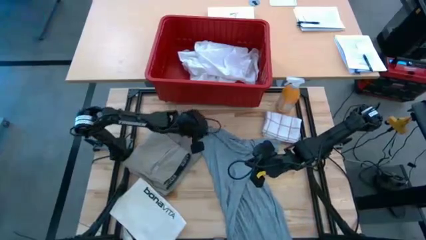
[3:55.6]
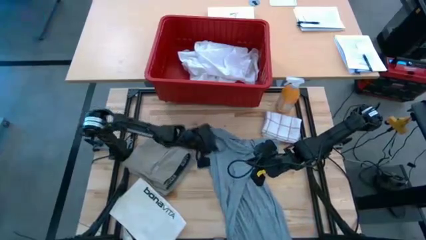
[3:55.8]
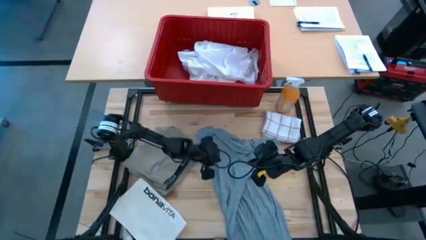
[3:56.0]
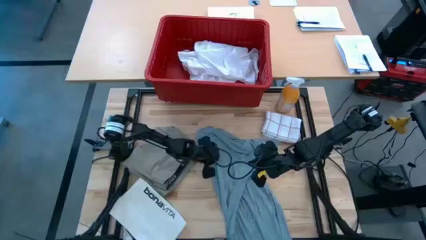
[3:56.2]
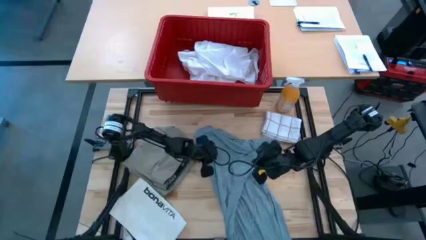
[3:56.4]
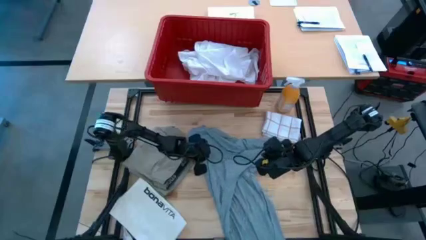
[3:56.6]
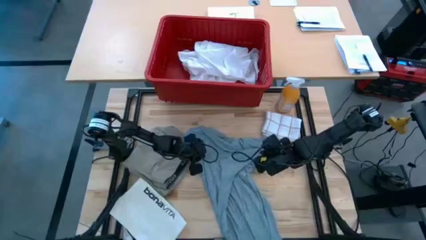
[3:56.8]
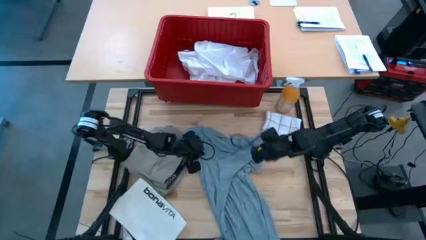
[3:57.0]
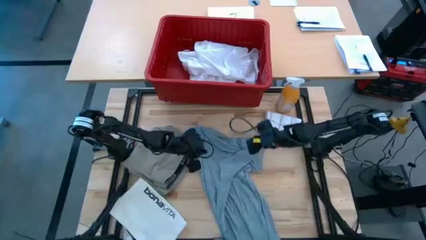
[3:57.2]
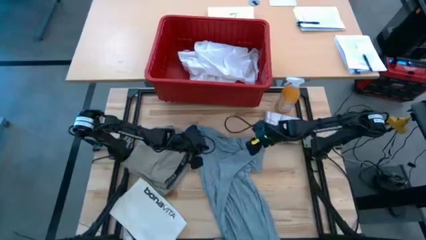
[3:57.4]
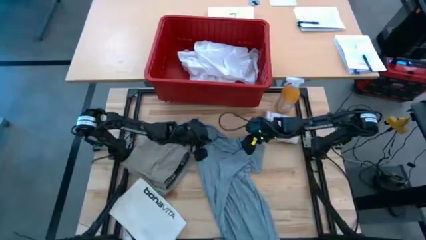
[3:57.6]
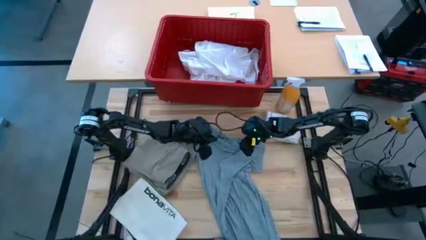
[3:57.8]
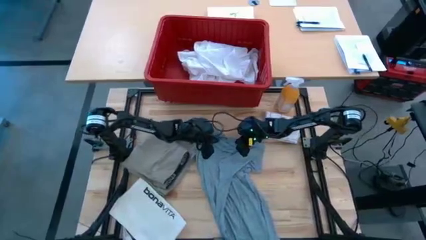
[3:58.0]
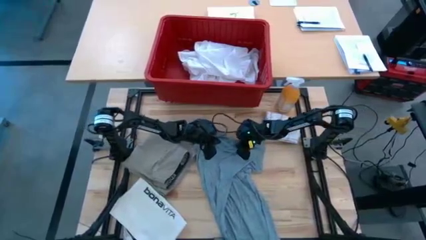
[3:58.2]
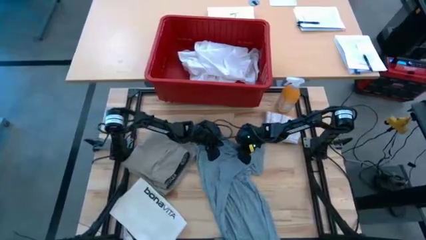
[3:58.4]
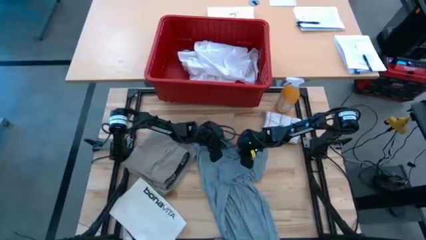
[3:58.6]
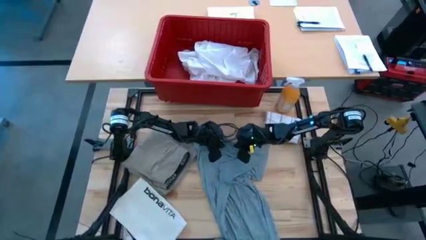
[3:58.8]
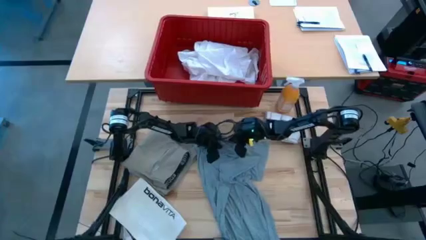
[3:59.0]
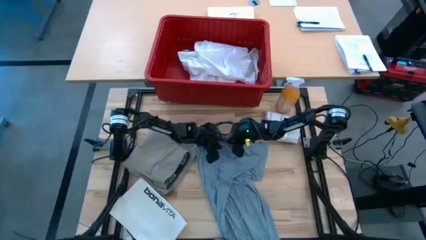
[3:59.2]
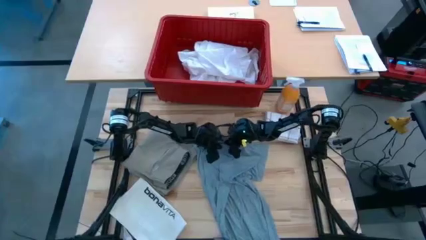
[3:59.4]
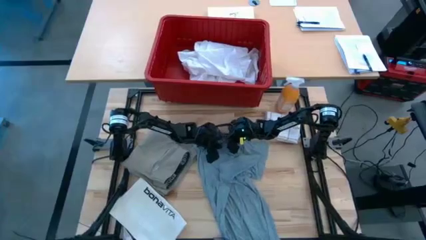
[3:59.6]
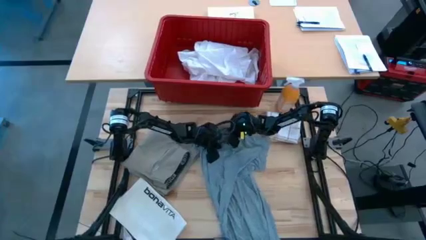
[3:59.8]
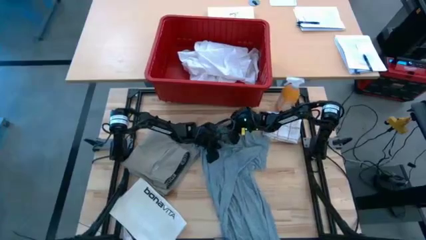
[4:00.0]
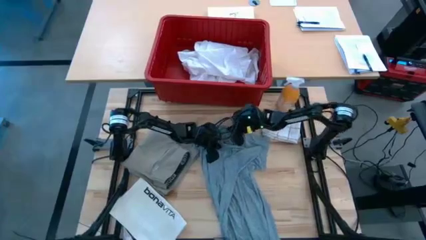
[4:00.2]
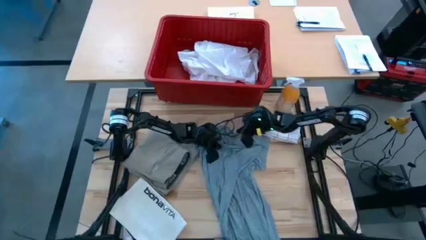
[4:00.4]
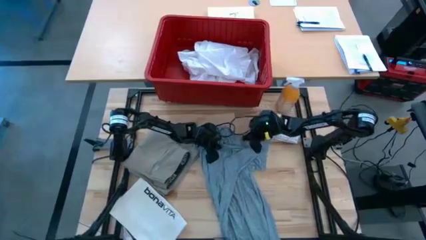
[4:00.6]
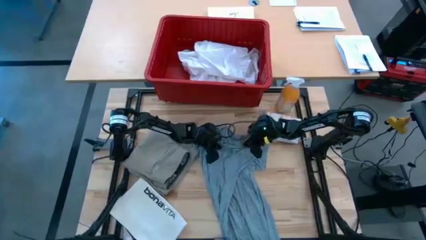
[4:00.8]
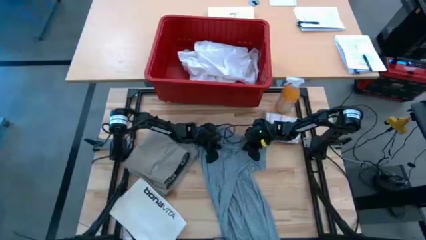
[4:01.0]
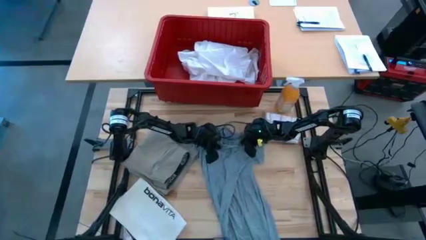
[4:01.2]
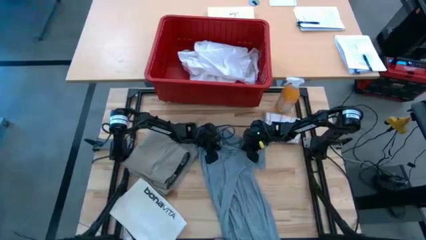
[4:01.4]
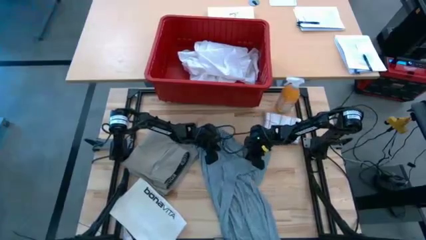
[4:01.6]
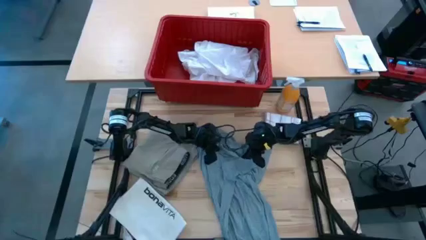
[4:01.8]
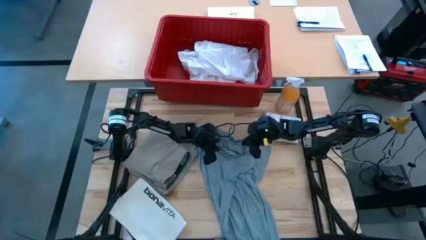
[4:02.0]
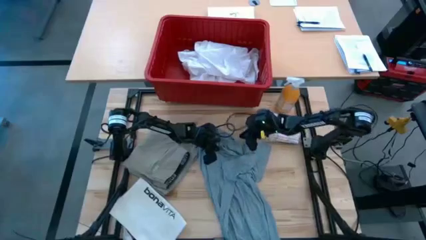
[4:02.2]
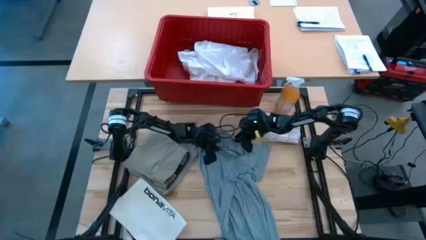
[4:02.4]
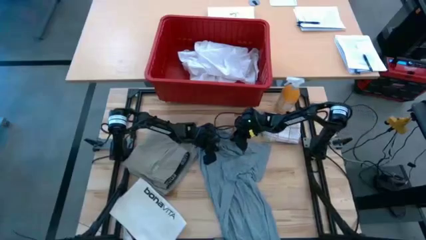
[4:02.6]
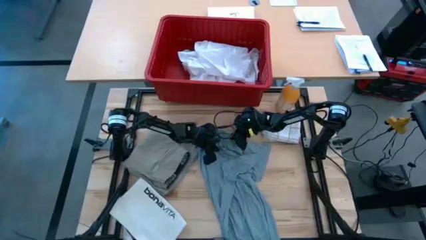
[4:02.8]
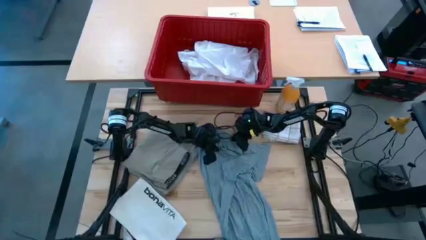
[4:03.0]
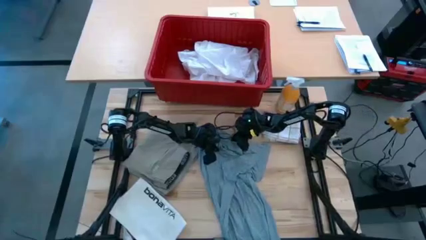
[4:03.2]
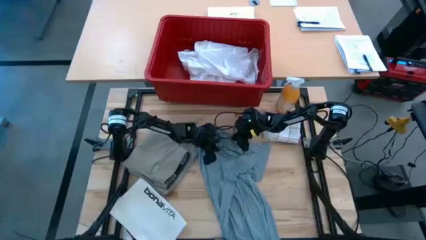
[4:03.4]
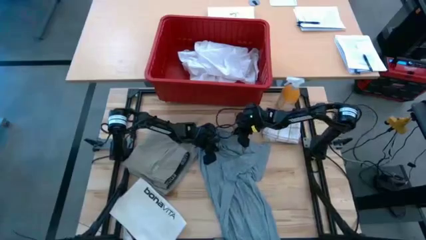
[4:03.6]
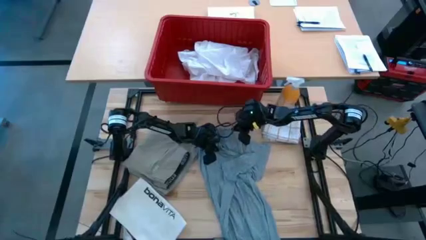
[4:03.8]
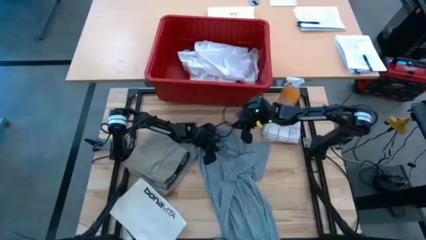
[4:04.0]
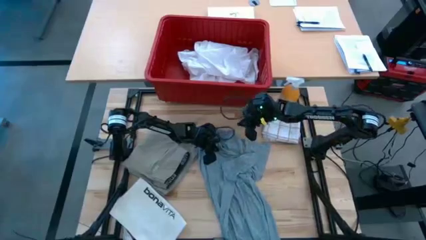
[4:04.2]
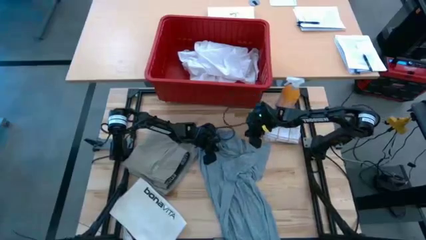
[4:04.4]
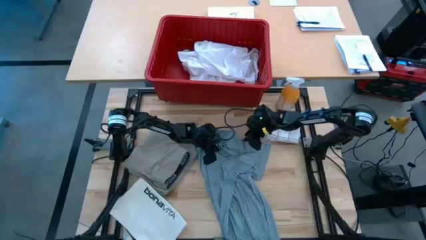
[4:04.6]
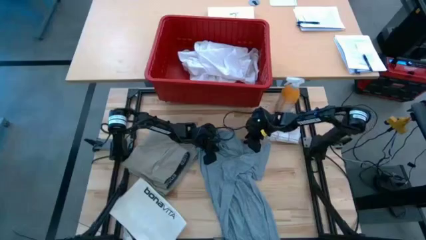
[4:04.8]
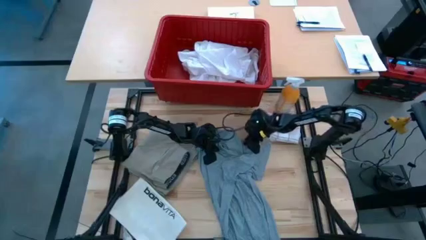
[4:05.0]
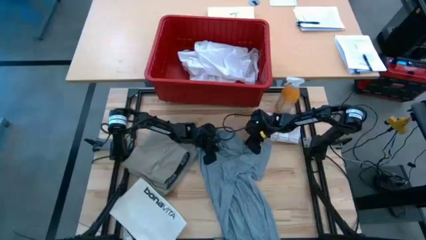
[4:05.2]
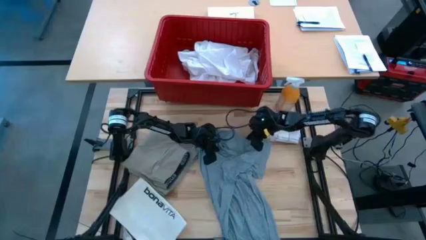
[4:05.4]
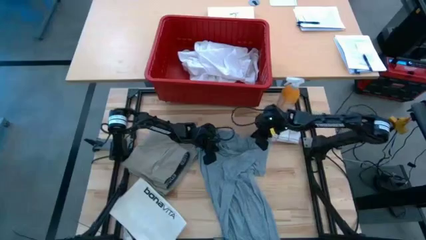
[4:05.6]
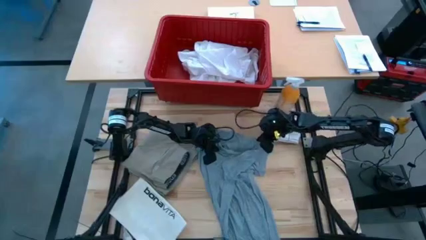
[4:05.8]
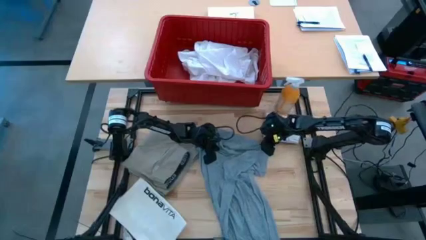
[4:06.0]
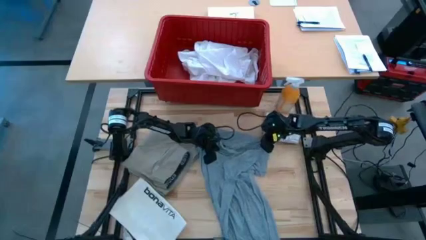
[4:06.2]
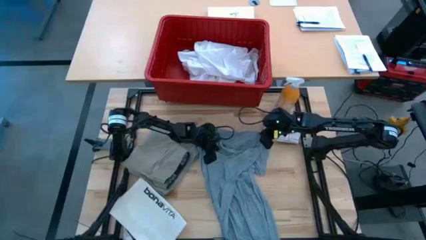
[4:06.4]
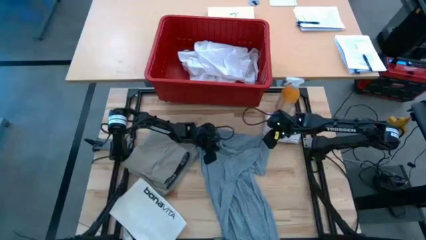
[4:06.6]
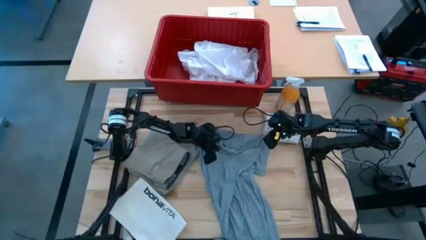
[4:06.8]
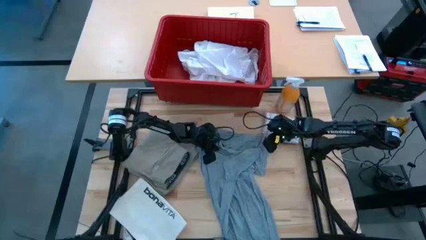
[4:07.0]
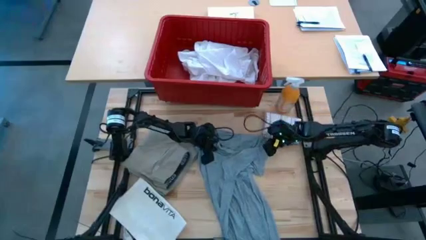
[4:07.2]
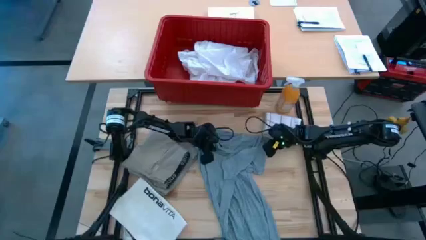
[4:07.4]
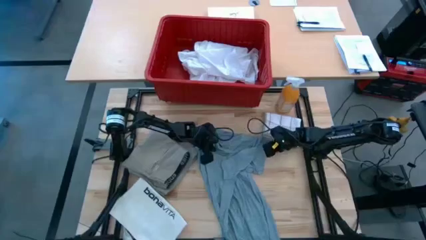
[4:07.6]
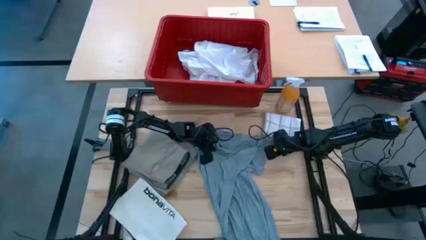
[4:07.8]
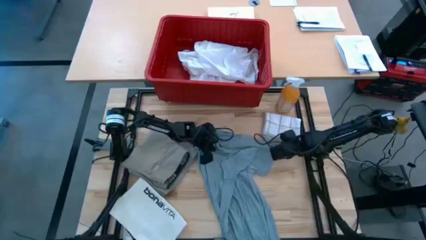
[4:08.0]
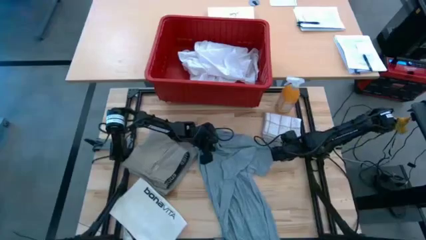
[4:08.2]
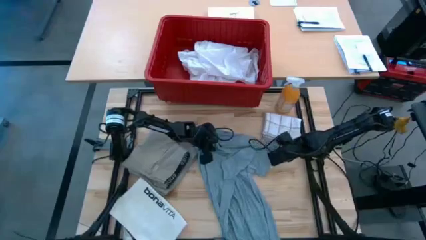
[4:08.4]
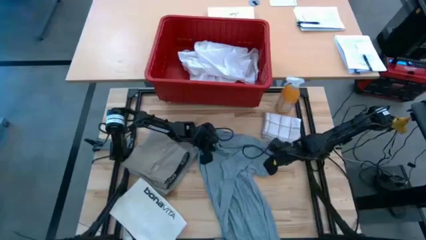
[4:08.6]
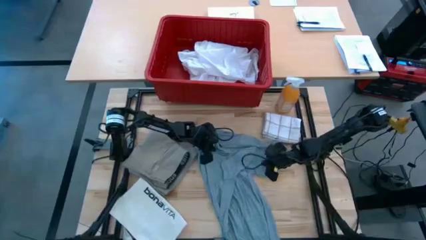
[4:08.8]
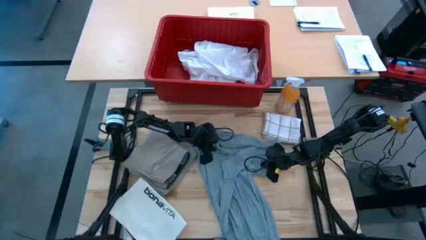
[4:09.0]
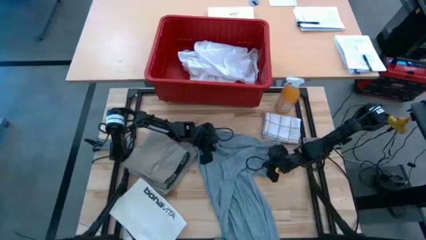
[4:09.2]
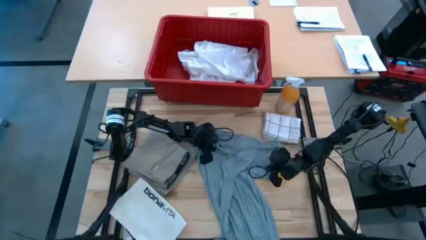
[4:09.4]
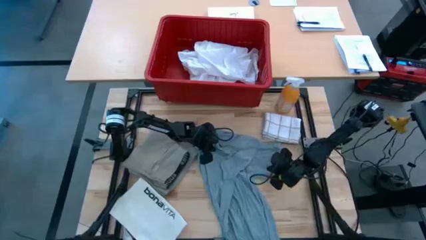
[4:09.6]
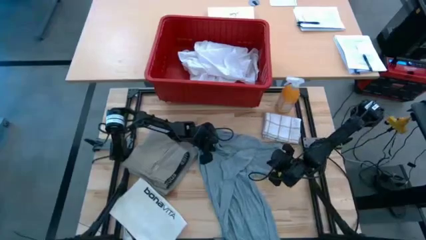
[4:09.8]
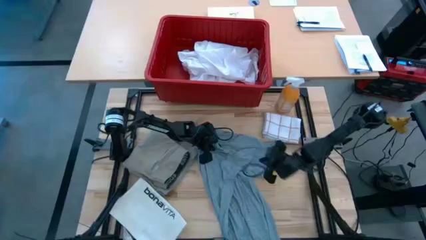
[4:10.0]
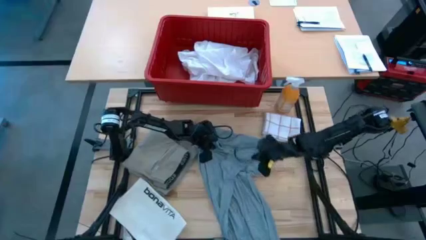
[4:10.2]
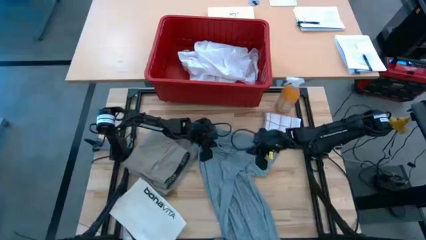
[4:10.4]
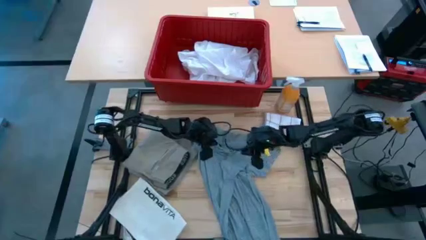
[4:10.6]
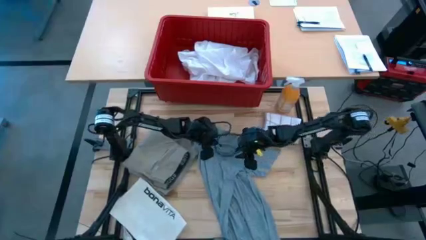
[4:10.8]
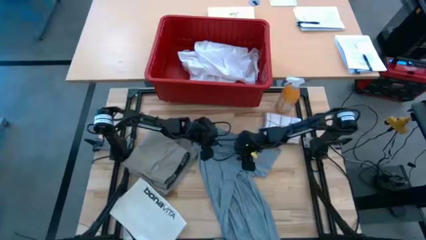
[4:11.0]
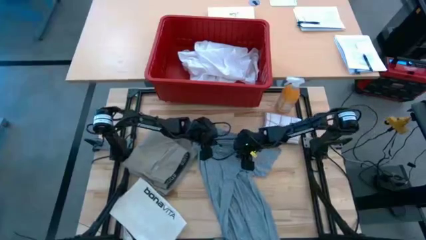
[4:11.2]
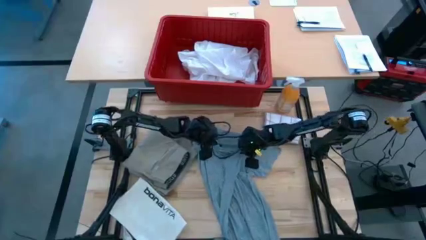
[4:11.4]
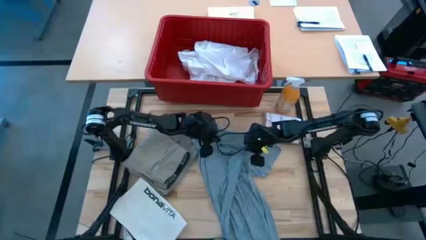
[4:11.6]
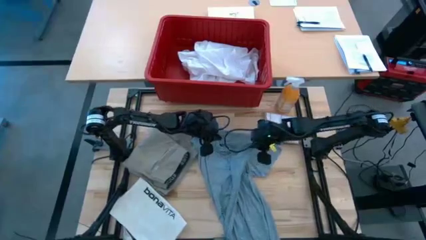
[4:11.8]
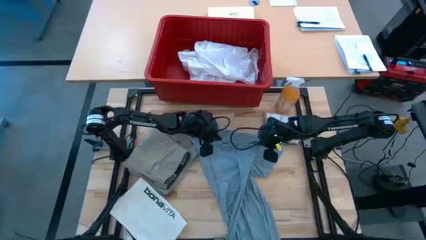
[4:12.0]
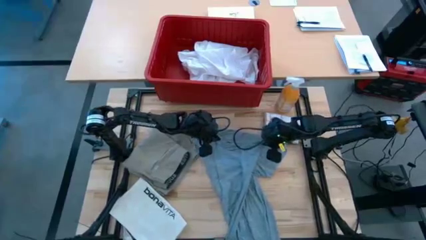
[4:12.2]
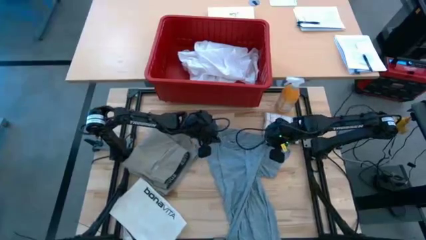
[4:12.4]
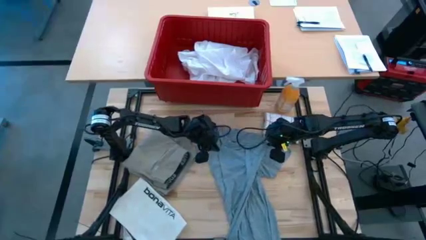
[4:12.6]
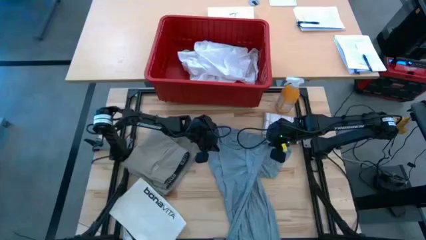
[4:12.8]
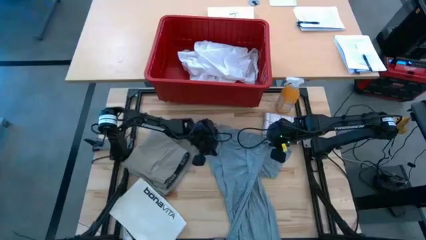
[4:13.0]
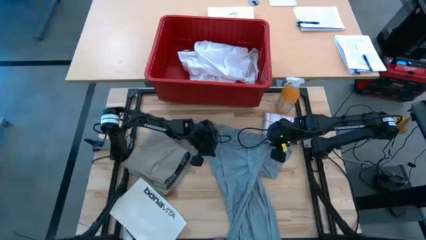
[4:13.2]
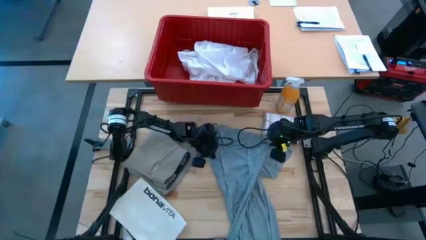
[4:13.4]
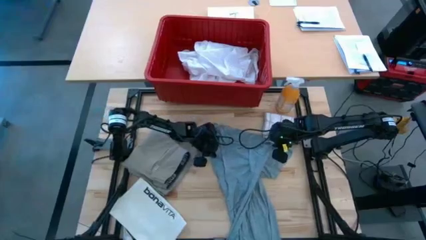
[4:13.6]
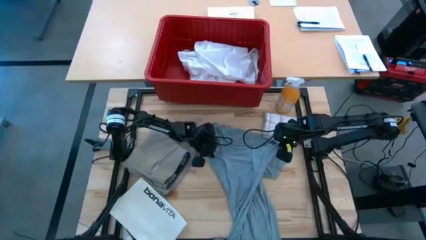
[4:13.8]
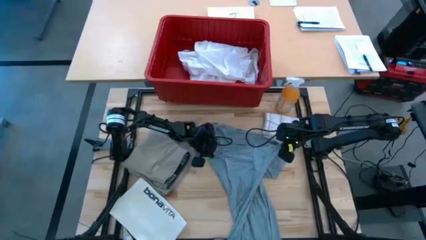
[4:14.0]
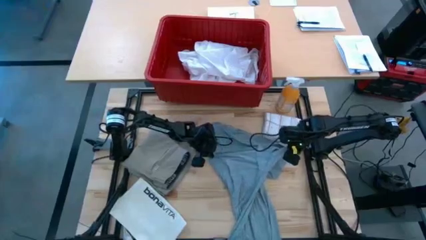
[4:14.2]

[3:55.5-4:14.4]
Task: Fold laundry
Fold the gray shirt
